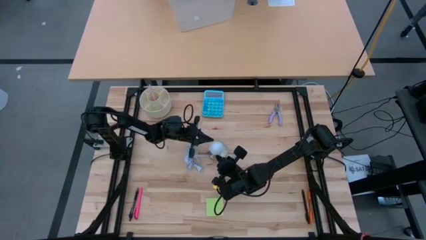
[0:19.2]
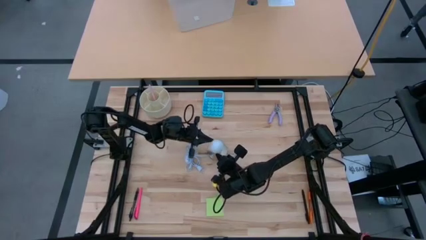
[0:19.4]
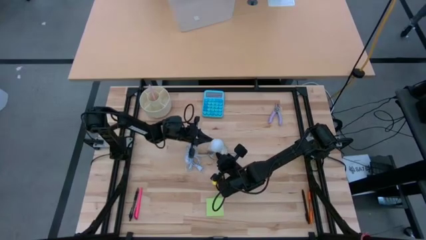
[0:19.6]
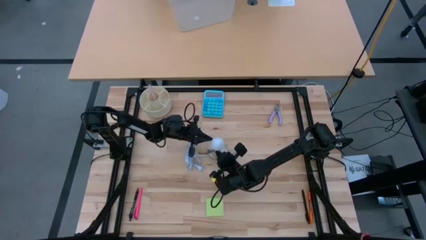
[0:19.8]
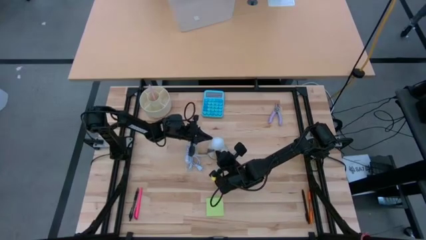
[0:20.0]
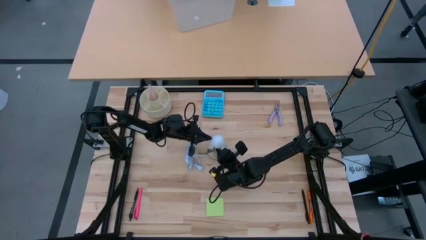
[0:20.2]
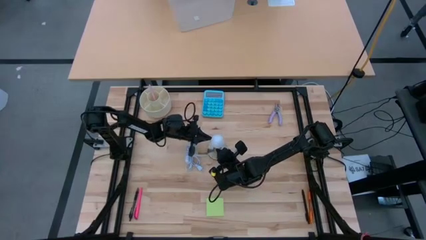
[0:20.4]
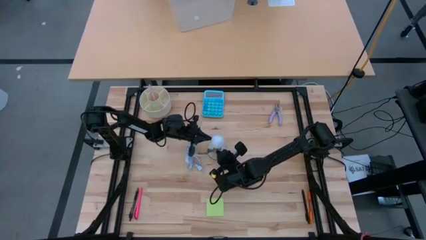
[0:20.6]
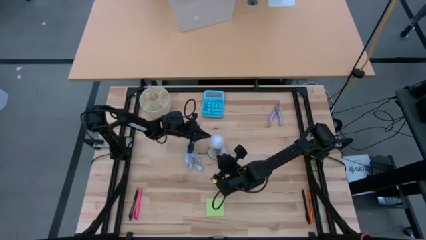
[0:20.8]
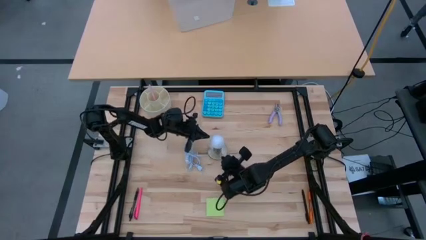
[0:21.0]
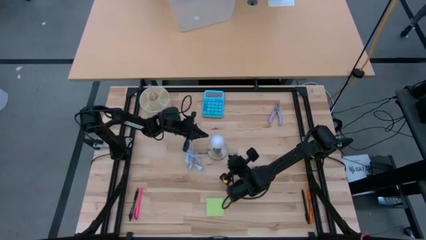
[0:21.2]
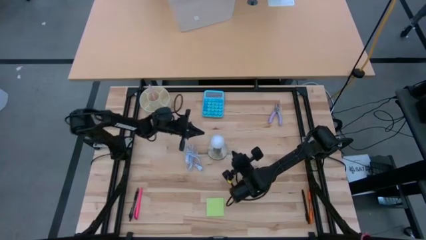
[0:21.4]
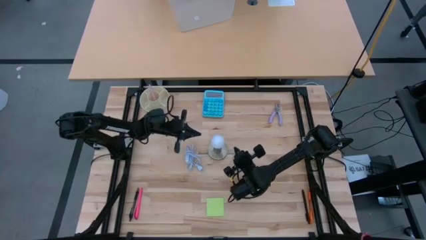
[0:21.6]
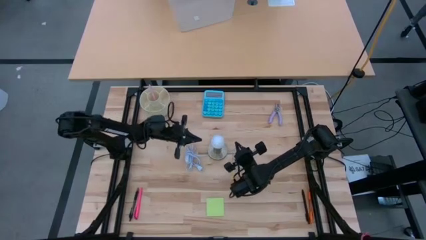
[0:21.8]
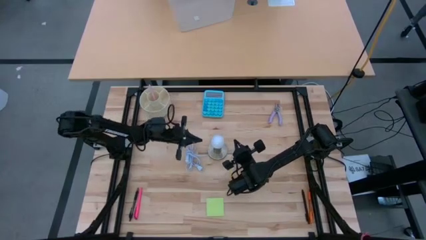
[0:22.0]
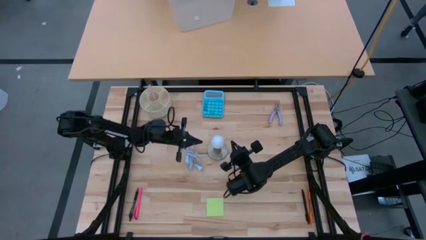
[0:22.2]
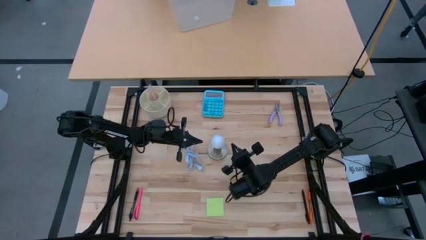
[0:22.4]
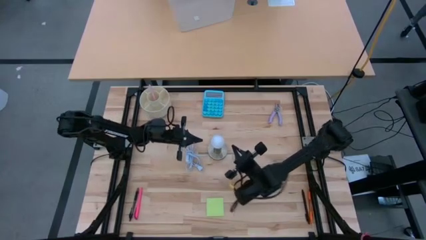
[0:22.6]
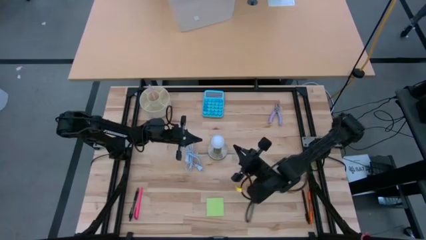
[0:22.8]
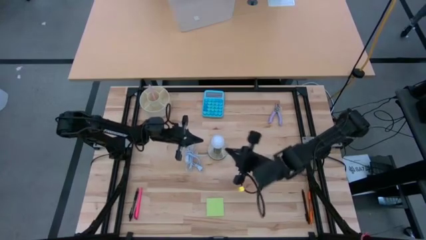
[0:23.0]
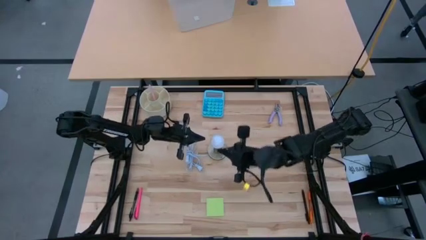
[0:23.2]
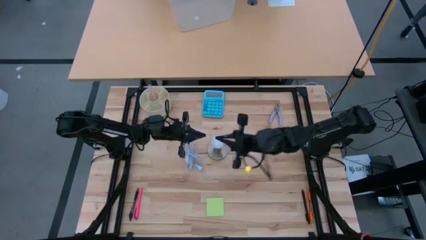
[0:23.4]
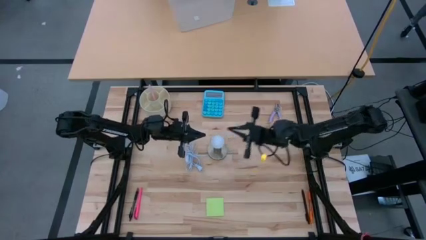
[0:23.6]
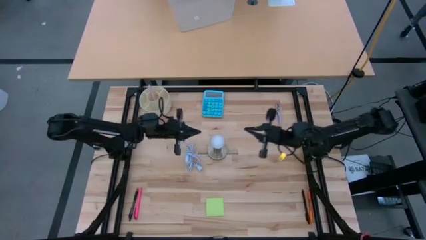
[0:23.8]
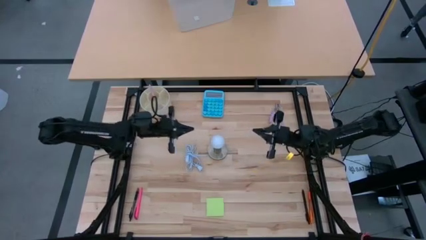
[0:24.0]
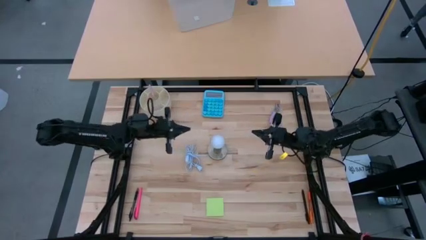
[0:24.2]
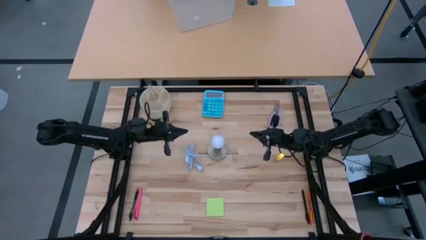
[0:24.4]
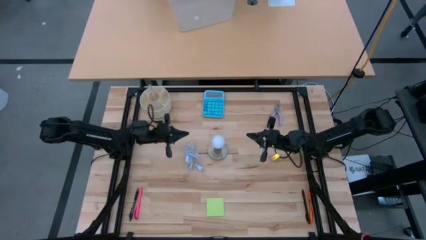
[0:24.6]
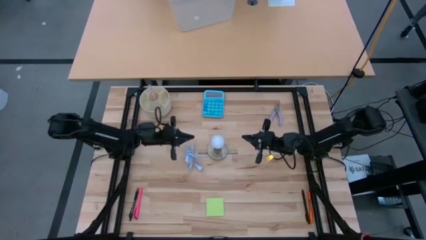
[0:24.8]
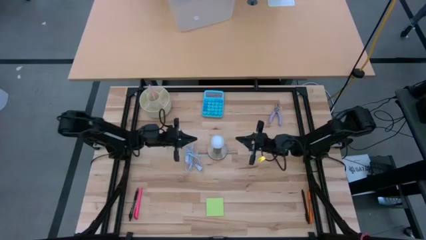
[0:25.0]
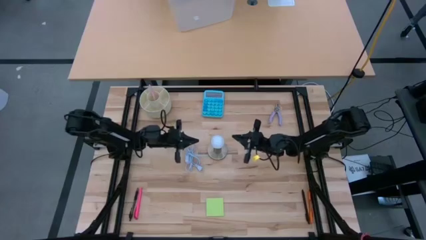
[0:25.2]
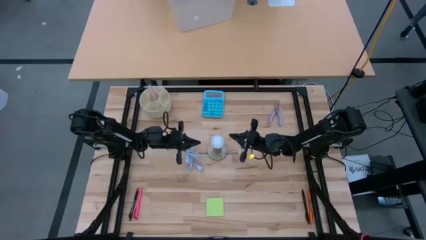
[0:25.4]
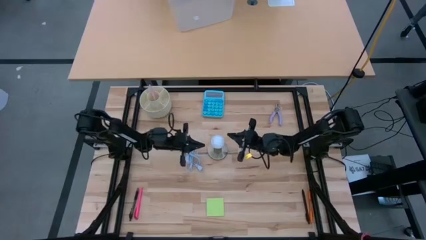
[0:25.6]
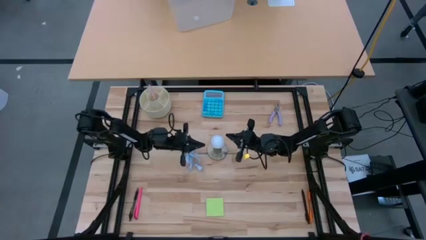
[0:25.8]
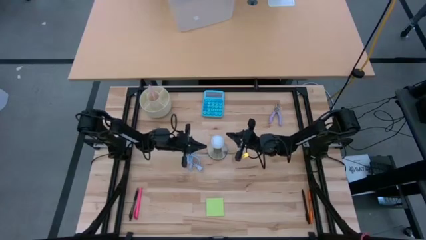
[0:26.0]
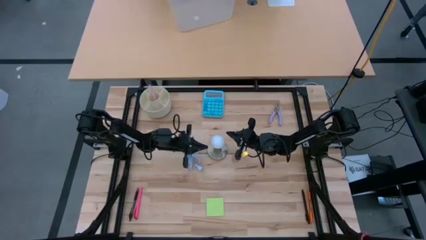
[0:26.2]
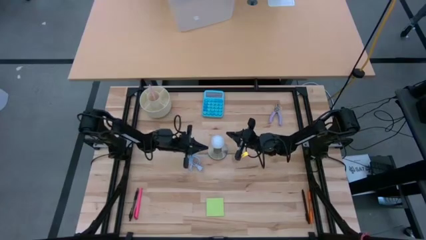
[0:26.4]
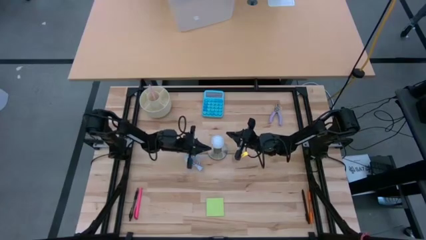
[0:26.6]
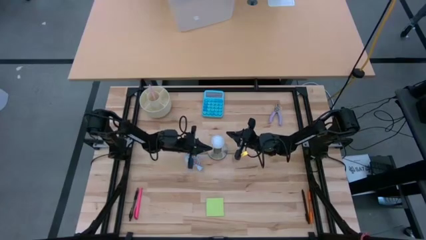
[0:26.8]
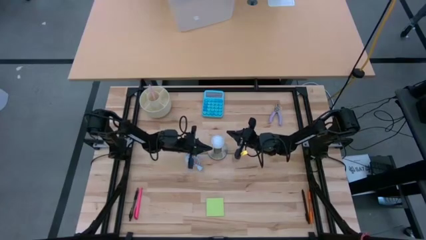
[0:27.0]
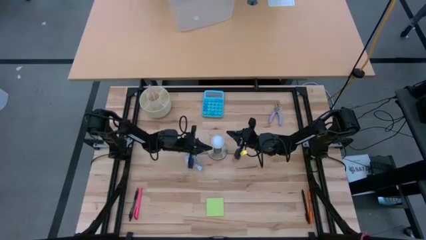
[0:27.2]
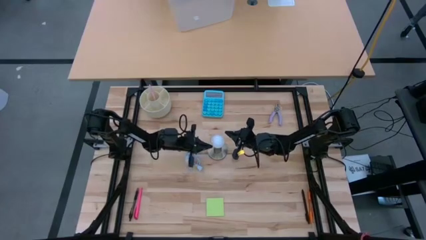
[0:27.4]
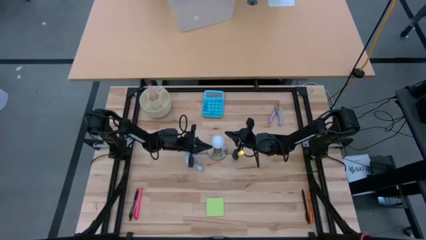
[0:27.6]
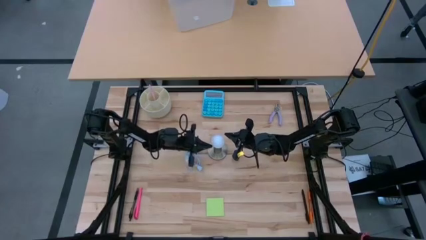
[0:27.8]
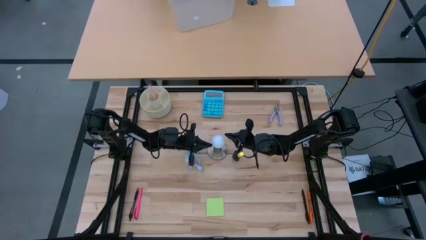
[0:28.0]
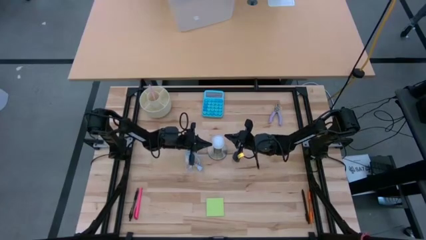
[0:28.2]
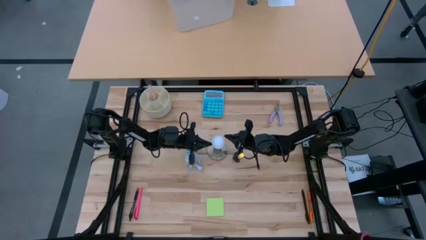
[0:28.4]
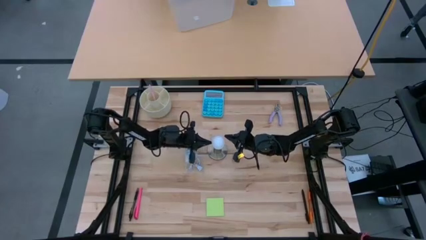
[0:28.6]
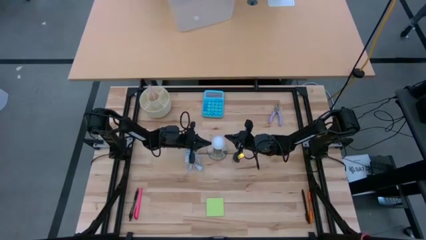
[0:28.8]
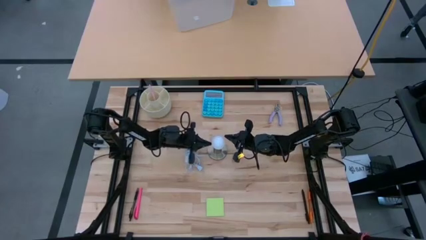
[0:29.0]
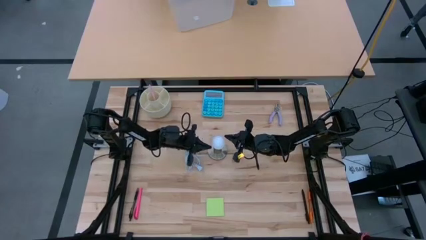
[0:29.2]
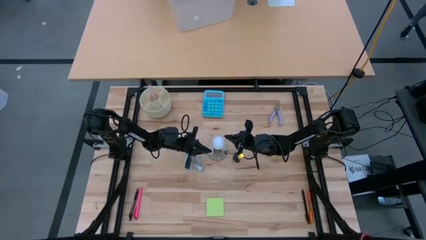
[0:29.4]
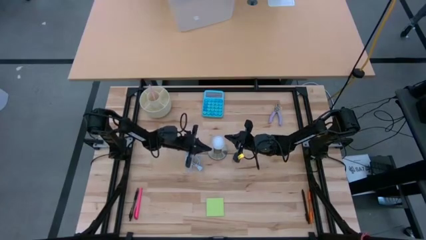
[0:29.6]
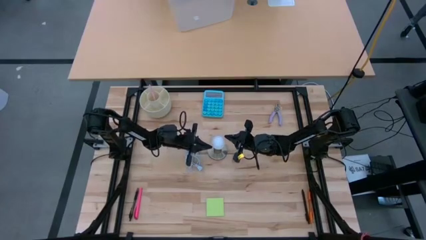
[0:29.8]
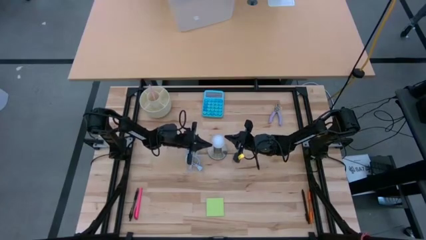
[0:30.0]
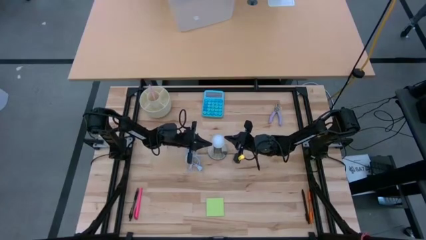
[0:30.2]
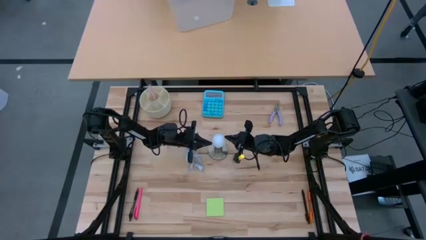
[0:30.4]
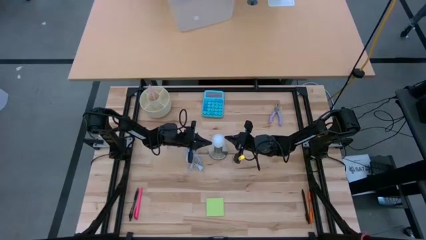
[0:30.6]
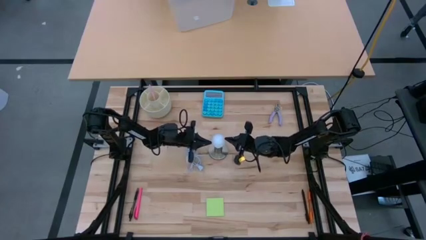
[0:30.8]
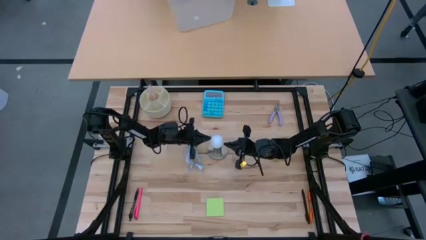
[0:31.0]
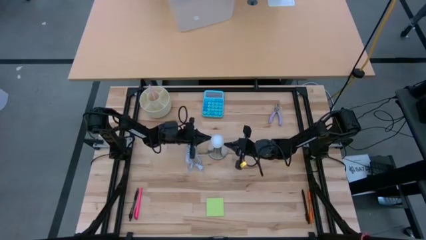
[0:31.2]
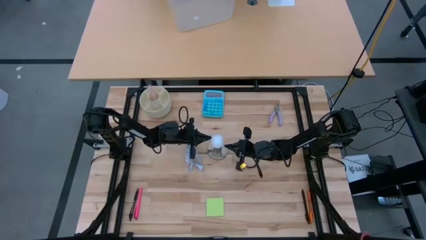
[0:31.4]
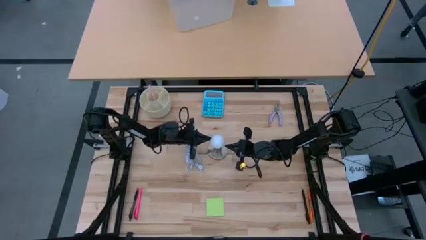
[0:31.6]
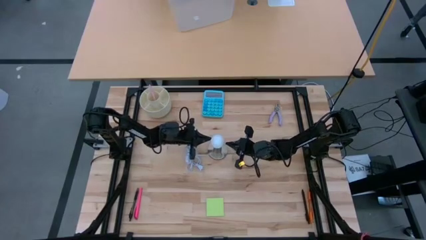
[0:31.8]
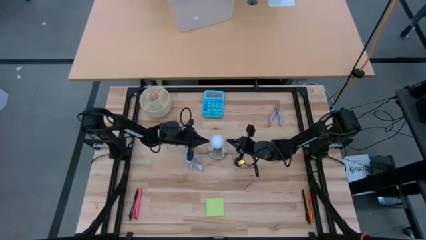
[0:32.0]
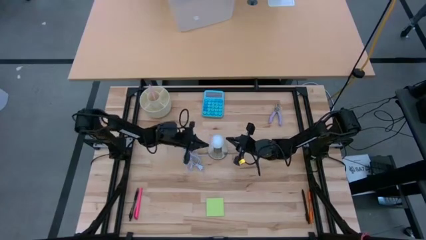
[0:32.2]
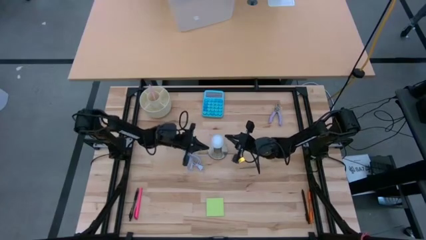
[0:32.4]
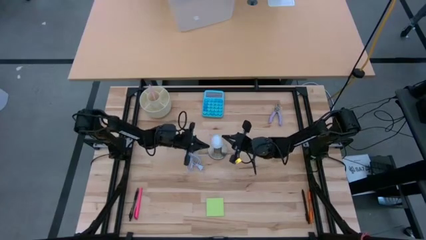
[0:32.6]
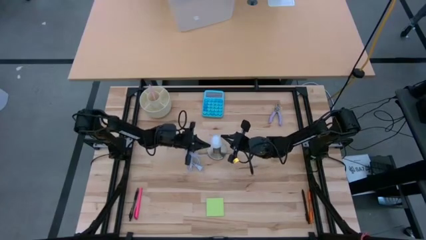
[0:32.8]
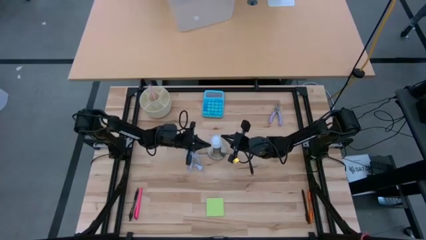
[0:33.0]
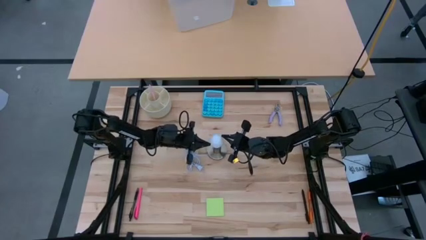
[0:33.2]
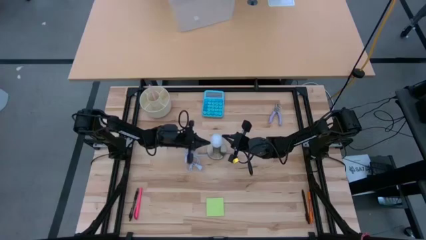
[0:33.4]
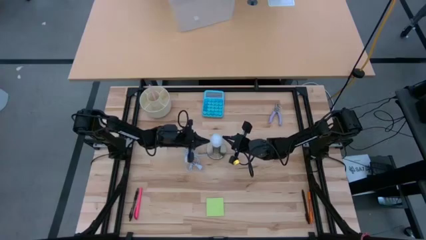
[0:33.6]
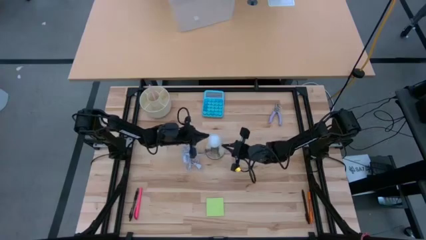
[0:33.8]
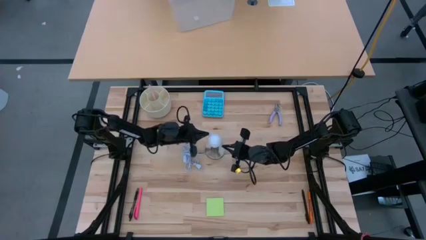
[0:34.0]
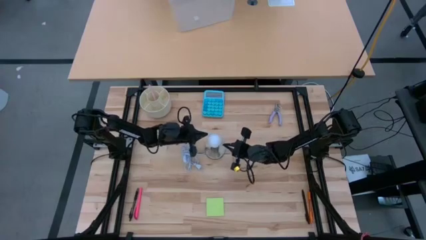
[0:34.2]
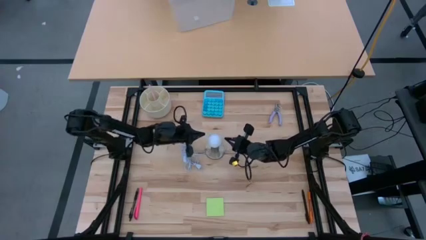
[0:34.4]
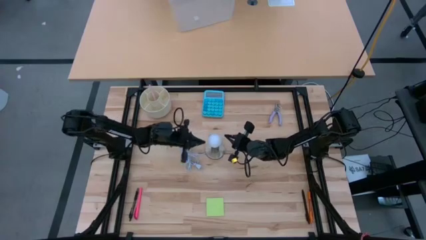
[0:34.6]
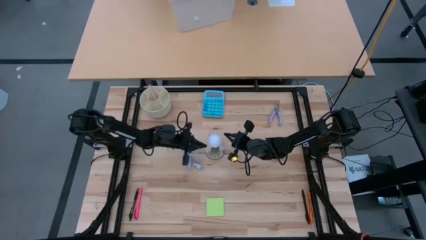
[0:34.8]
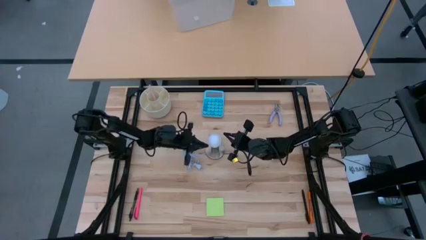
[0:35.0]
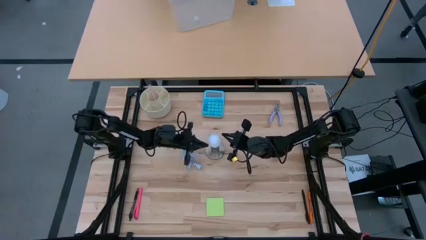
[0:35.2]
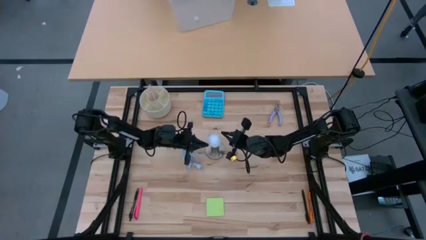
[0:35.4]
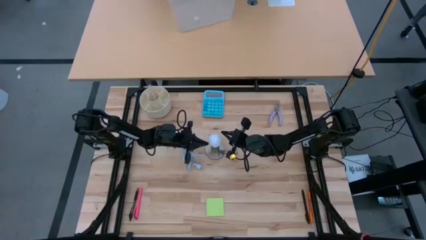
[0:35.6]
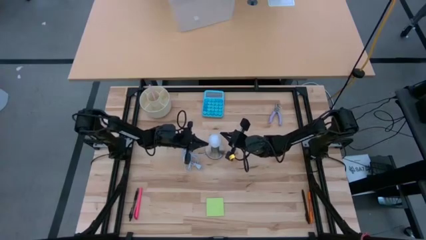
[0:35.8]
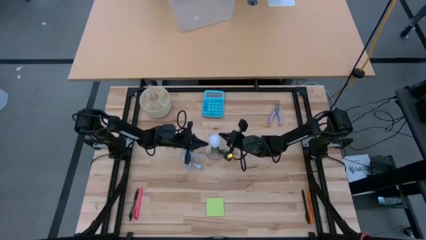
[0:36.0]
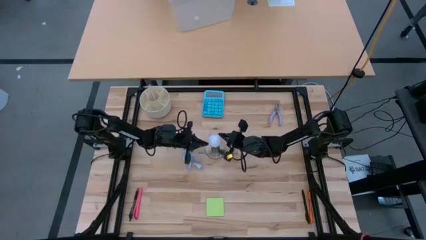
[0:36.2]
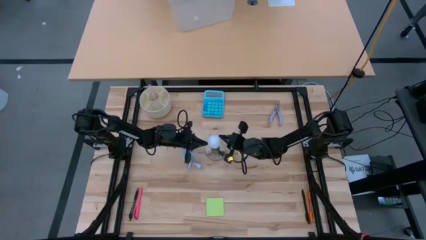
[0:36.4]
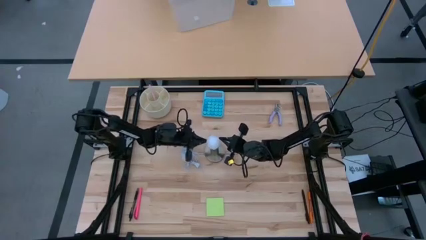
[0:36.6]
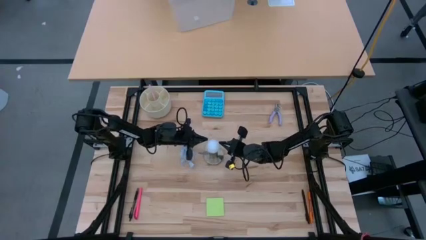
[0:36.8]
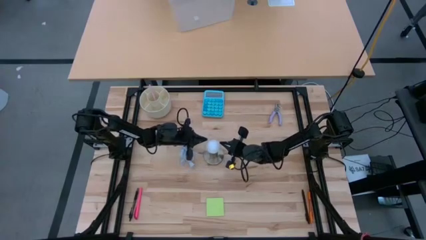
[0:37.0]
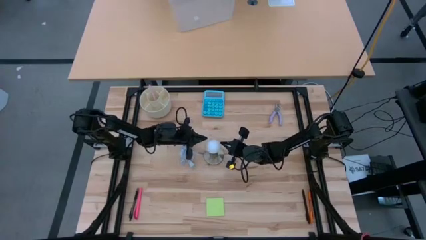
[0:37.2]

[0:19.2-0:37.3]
Task: Screw lightbulb
Insert the lightbulb into the lamp
